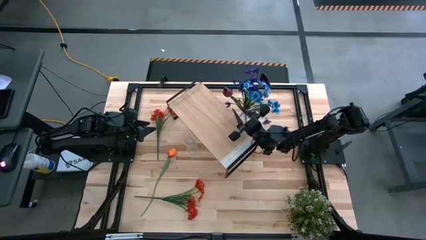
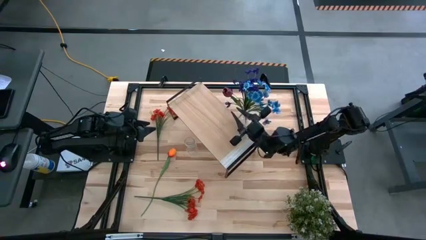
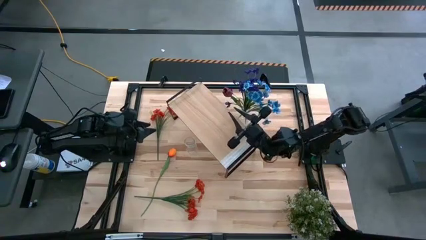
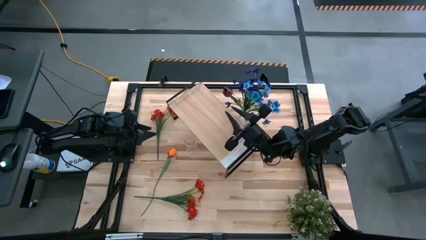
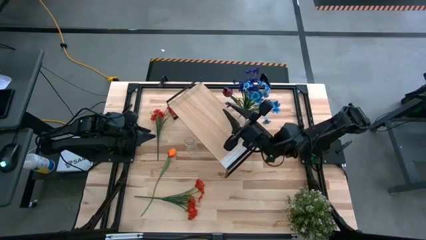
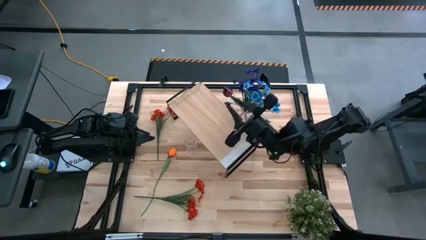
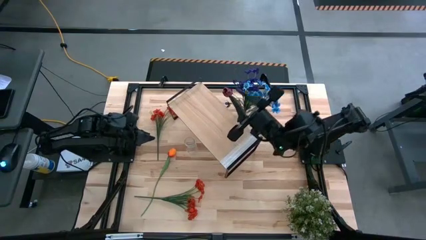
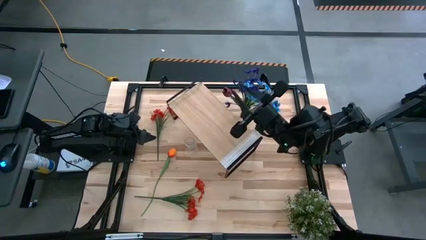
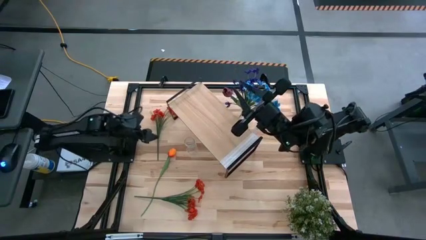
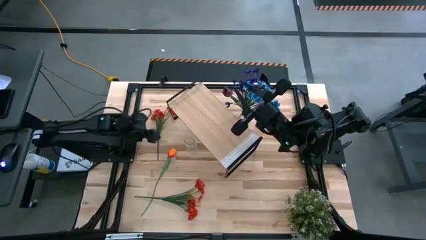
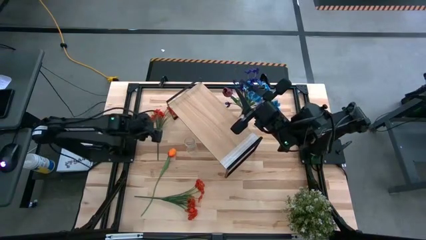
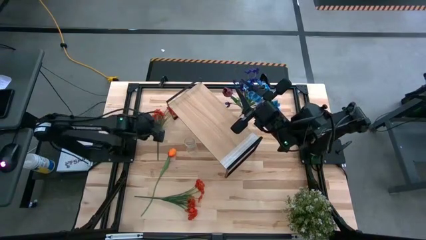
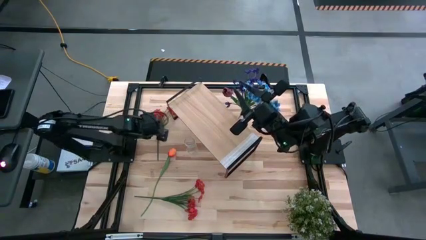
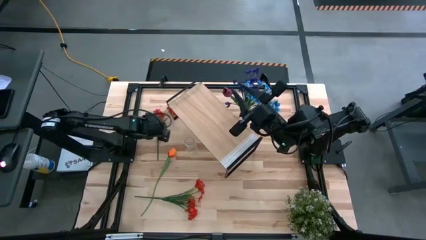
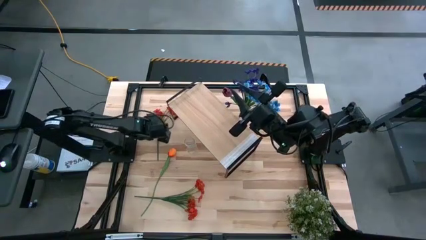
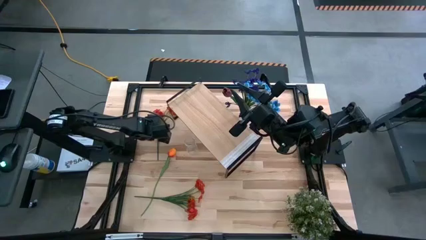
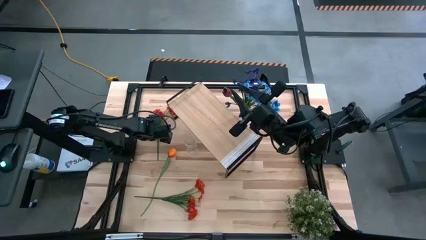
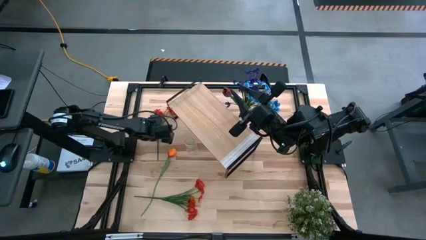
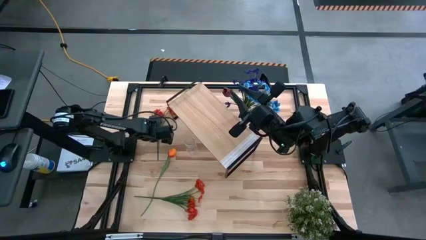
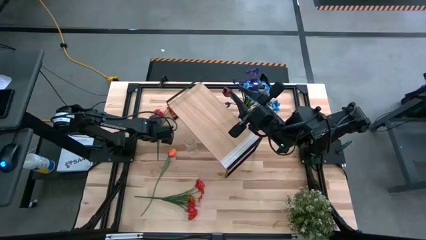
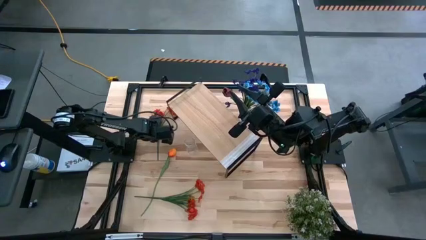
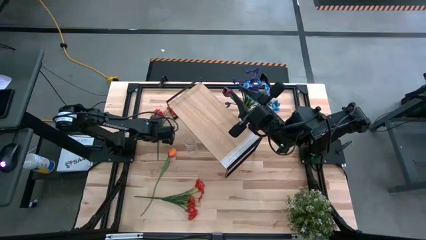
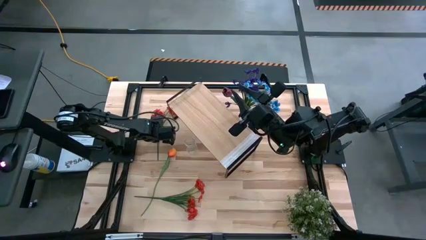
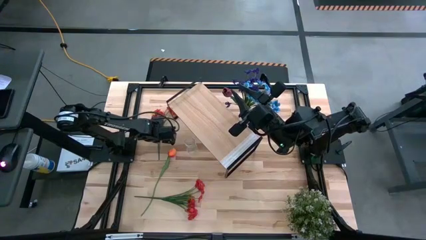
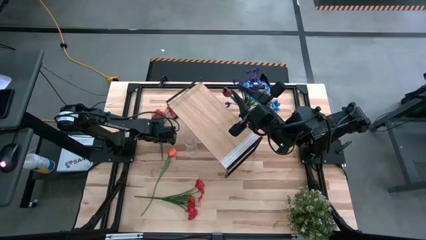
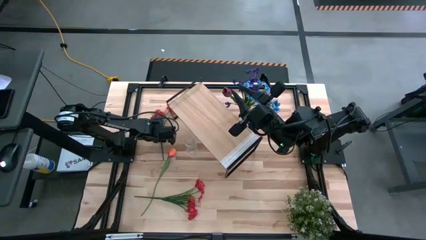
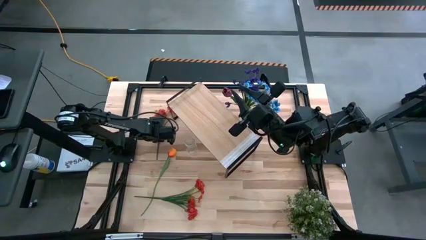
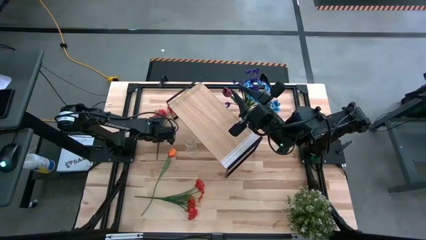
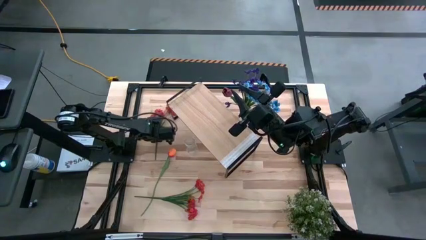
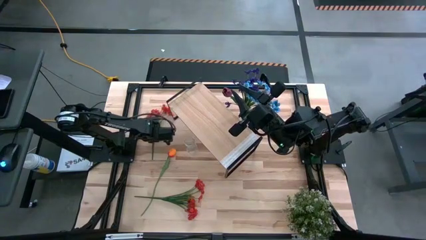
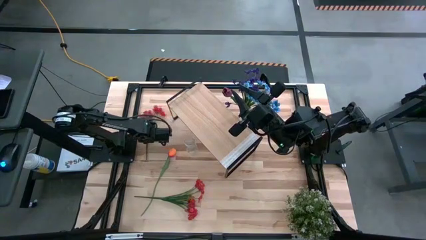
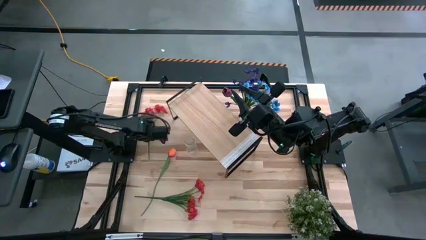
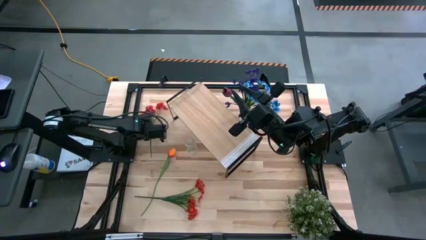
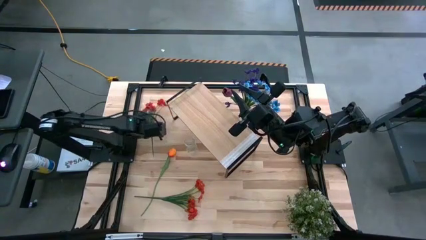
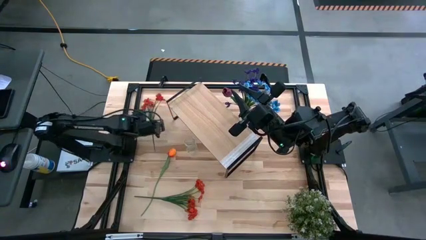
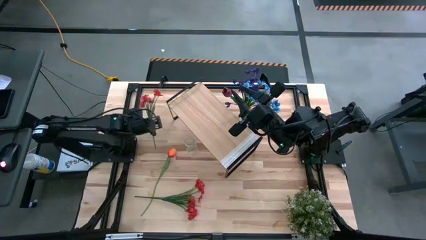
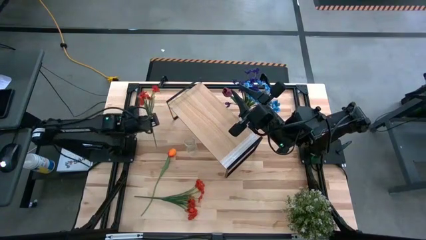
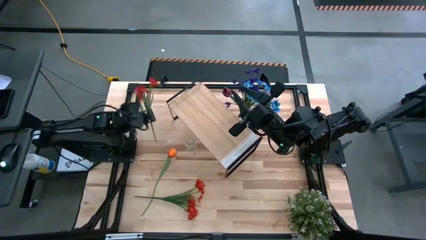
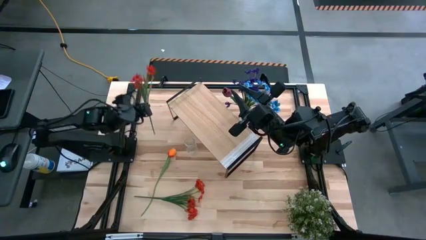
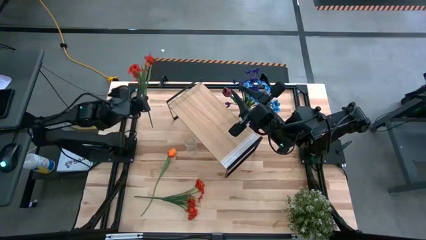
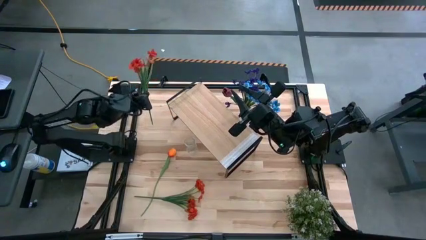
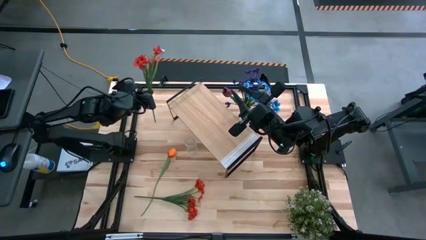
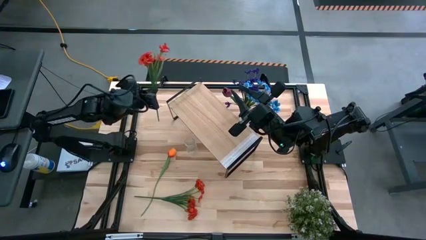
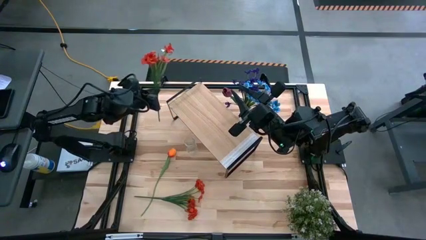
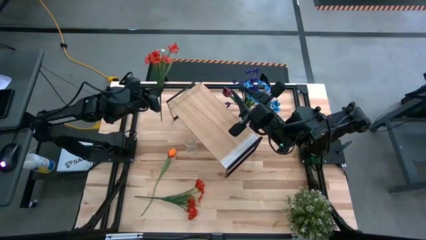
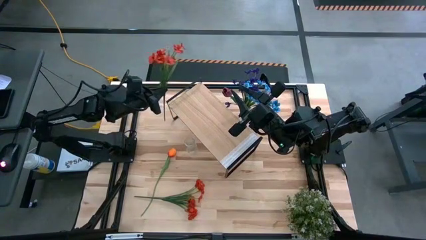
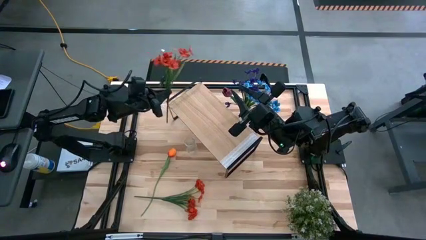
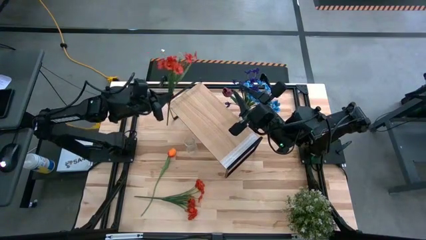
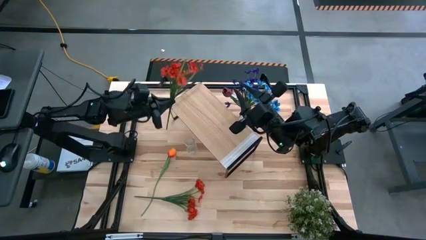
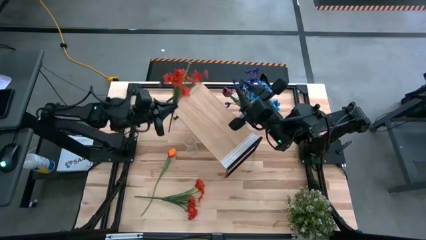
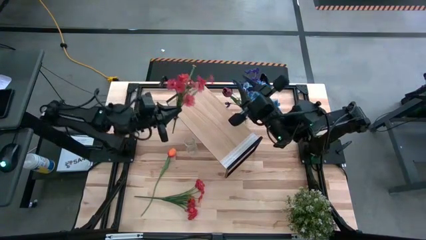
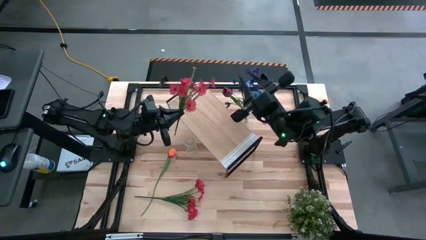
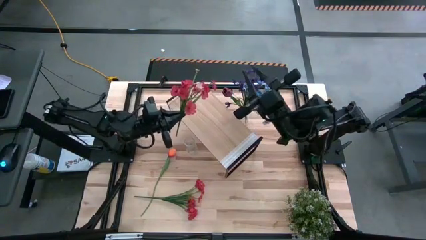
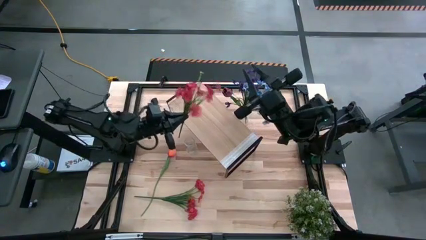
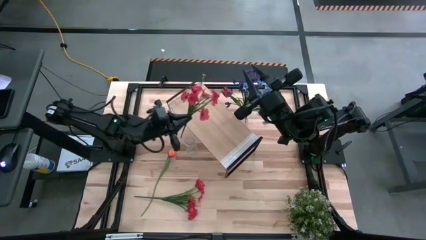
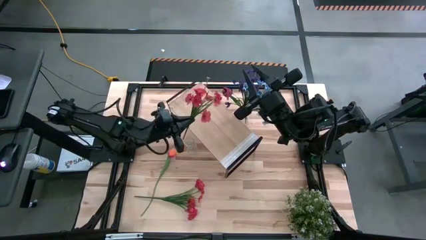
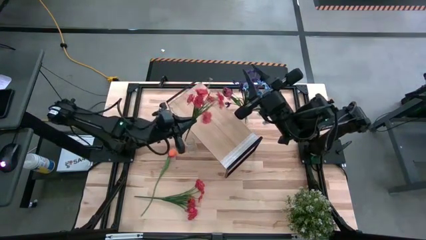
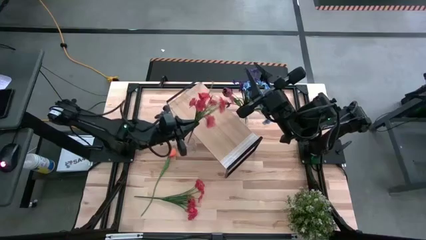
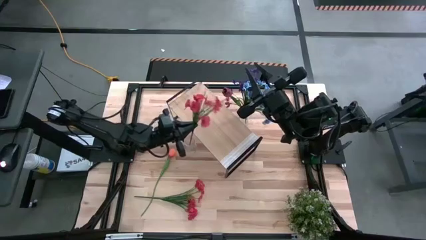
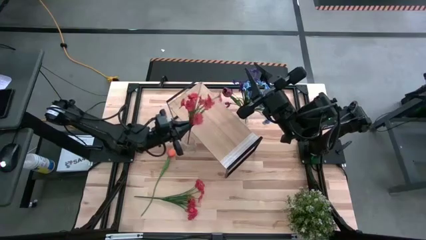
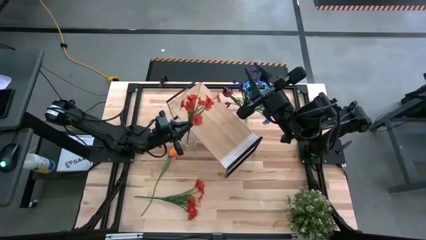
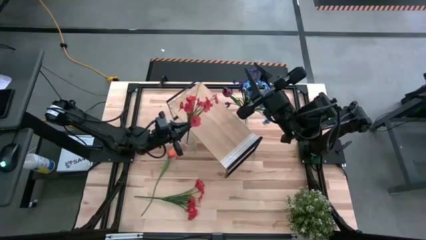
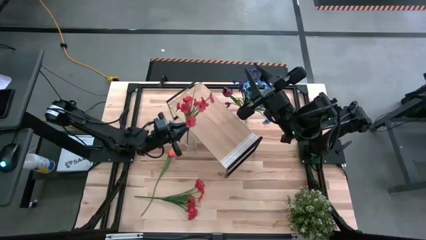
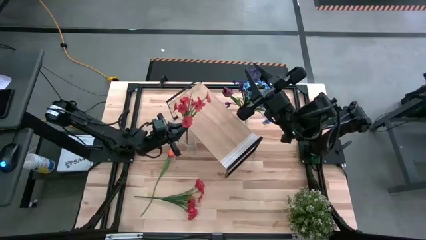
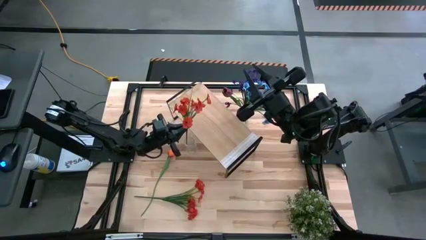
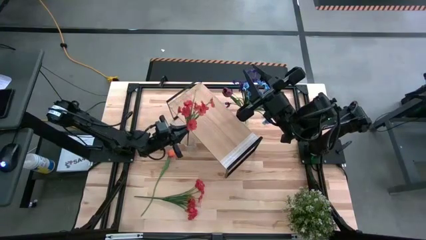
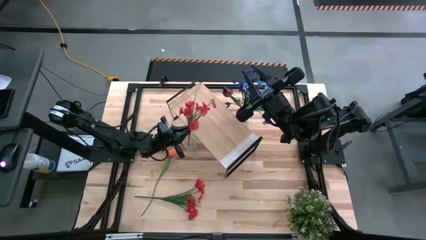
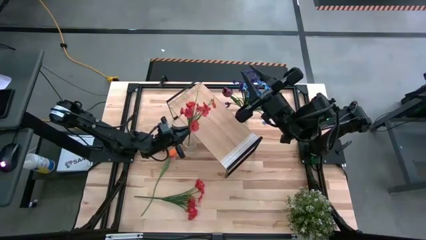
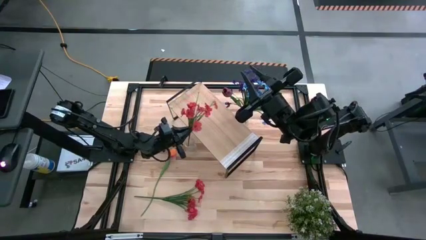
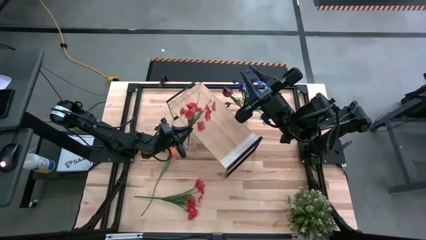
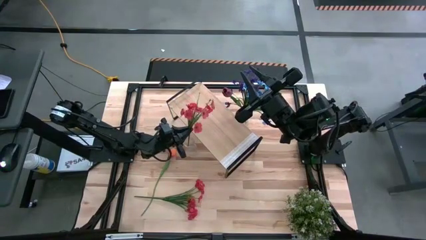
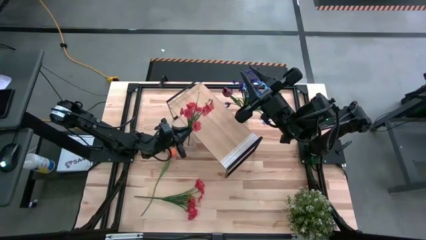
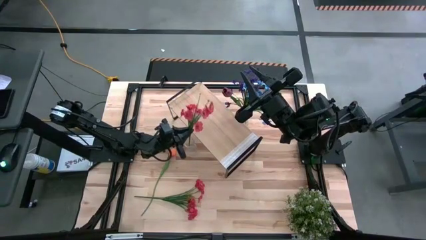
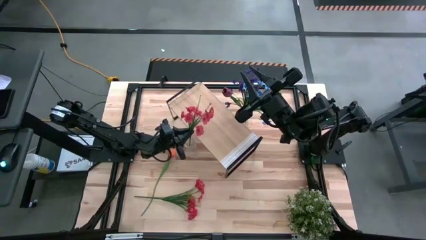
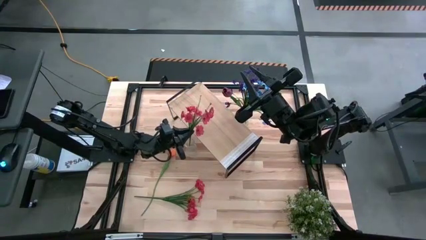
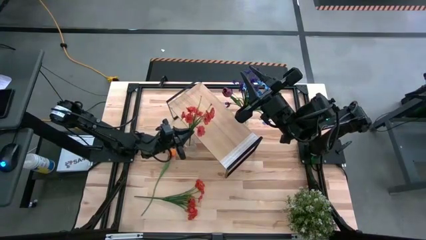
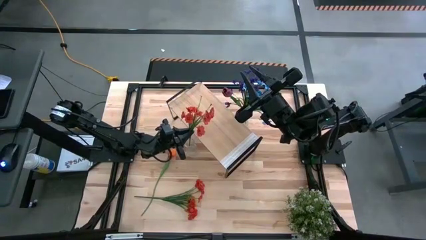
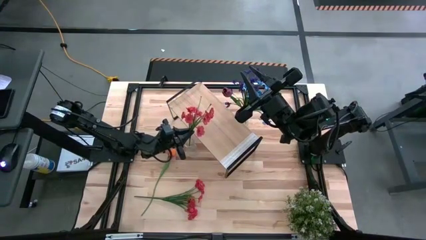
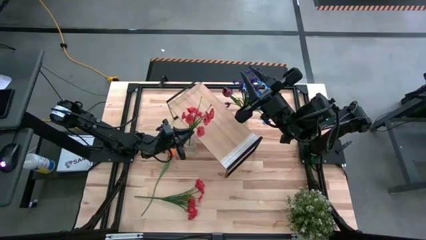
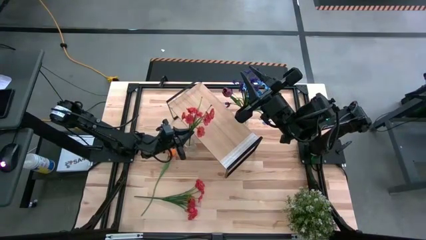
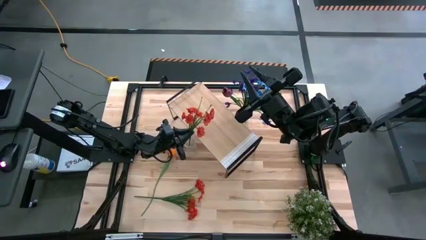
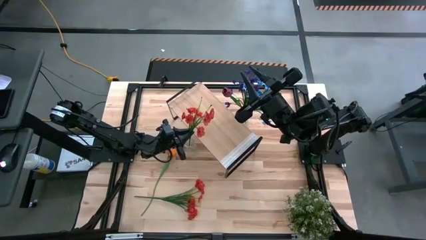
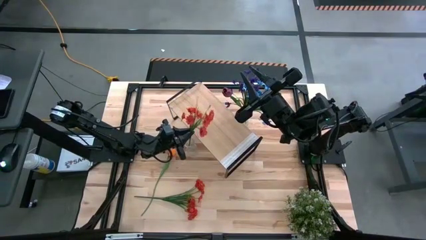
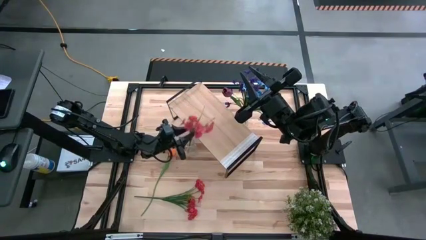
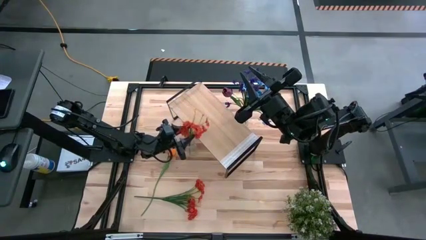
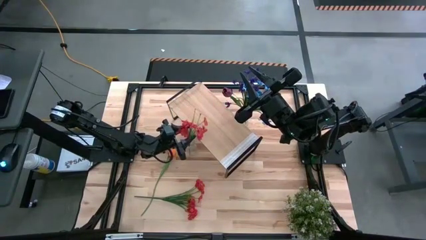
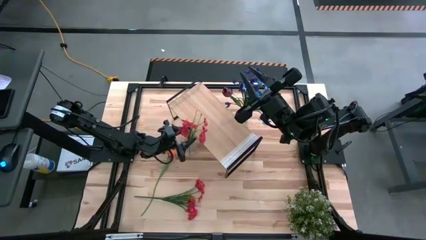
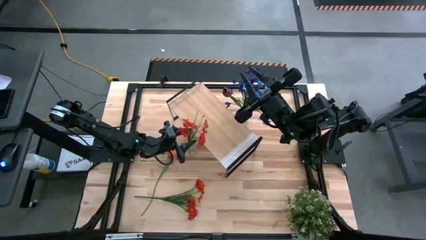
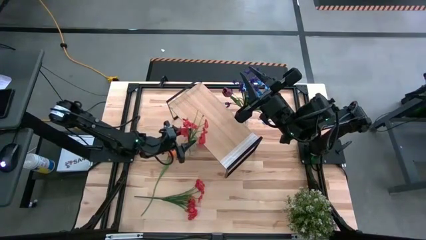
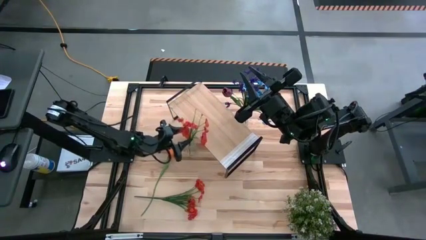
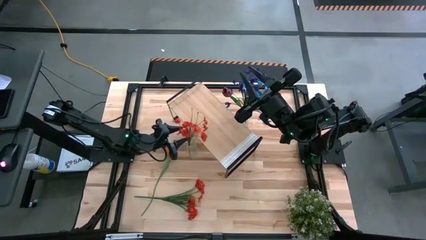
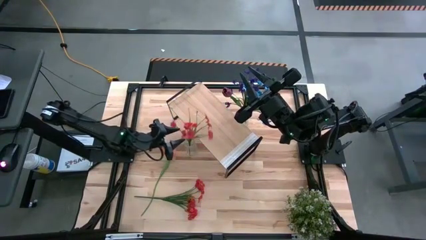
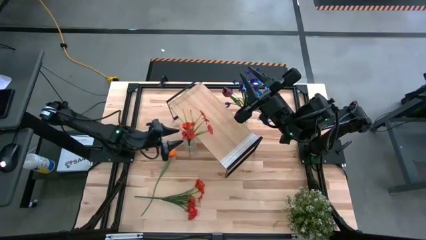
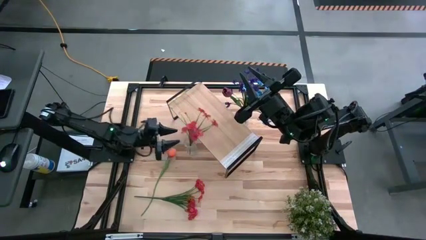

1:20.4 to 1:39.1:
Task: Pick and place flowers into a vace then onto a shelf
Put the top orange flowers into the bottom transparent vase
